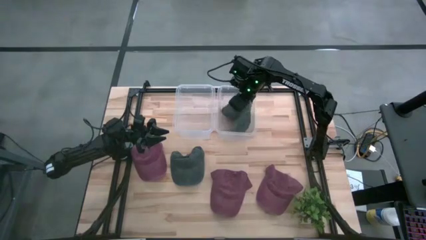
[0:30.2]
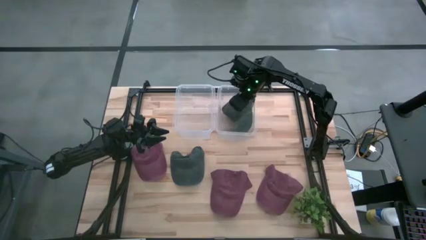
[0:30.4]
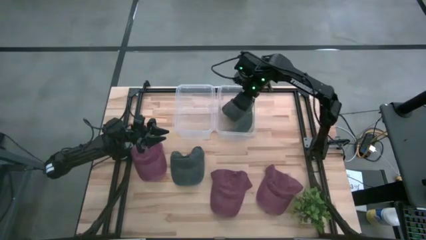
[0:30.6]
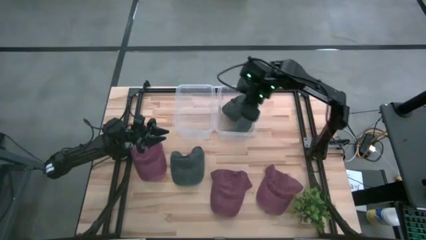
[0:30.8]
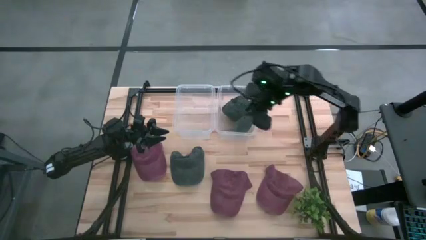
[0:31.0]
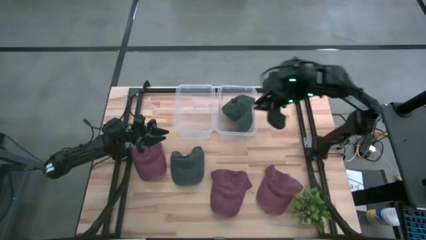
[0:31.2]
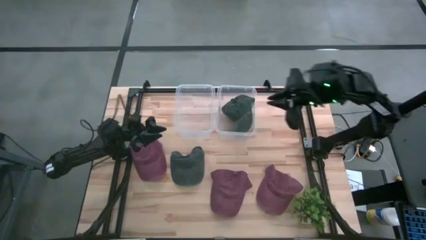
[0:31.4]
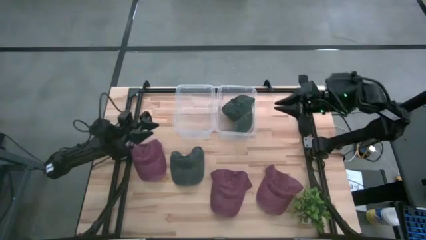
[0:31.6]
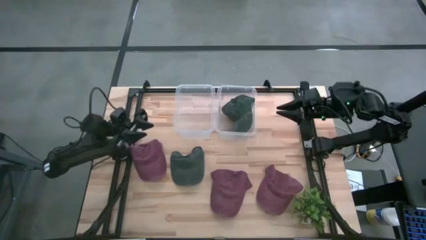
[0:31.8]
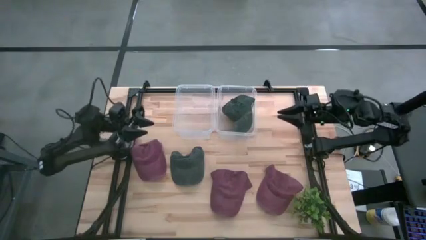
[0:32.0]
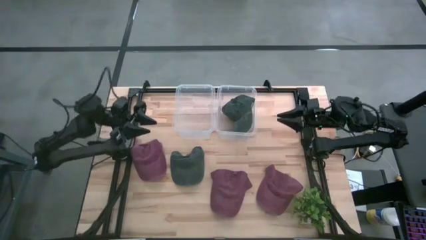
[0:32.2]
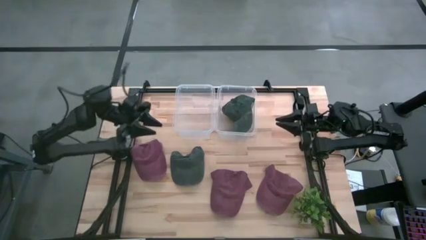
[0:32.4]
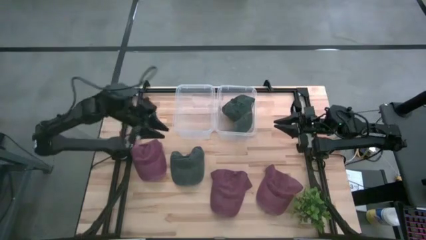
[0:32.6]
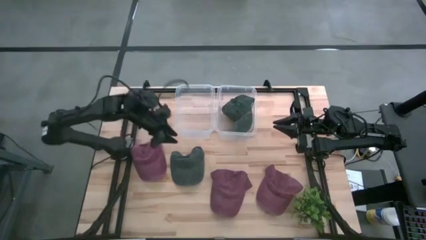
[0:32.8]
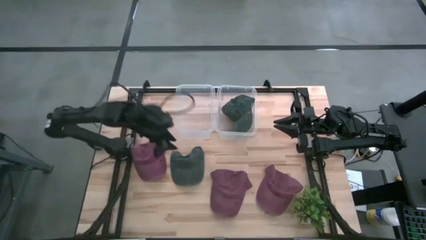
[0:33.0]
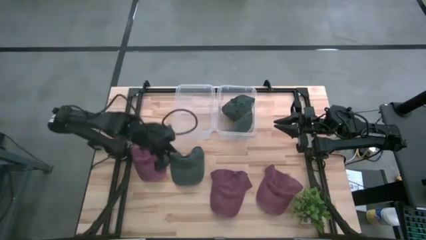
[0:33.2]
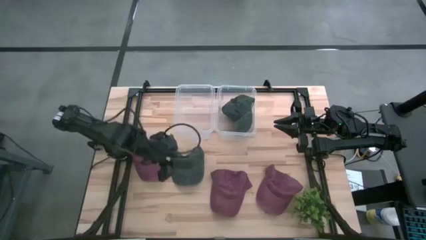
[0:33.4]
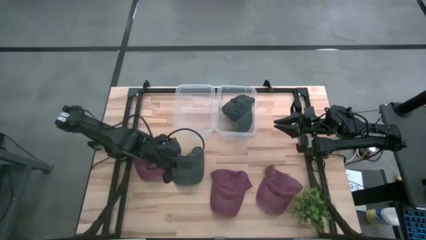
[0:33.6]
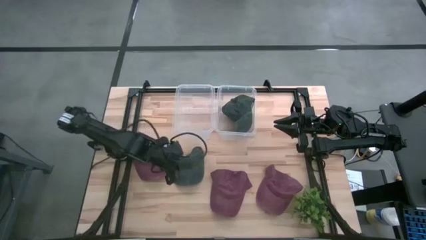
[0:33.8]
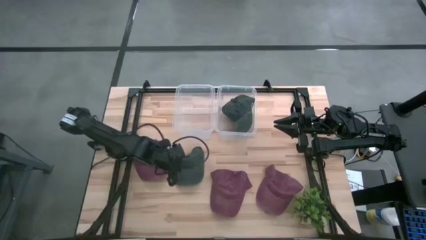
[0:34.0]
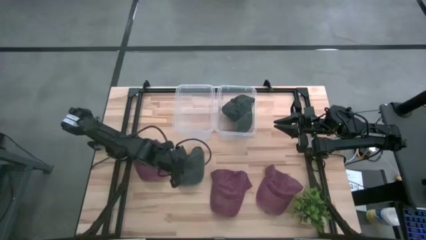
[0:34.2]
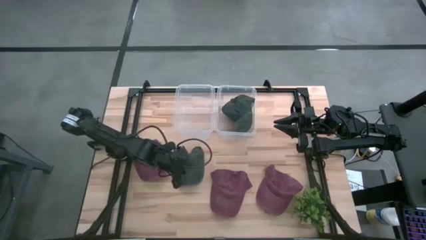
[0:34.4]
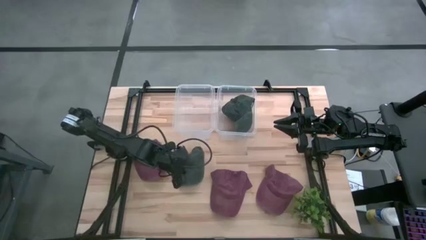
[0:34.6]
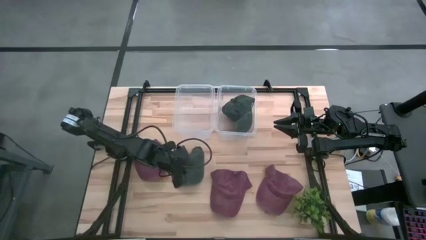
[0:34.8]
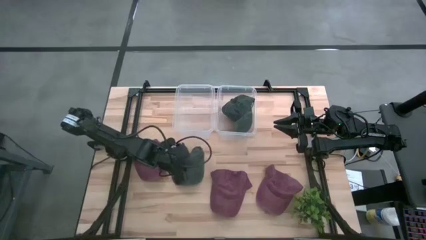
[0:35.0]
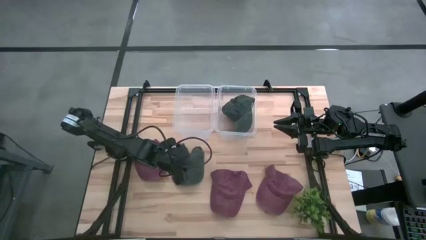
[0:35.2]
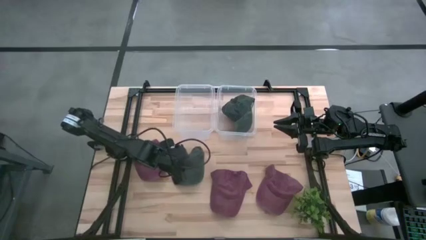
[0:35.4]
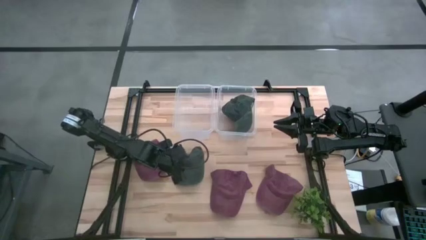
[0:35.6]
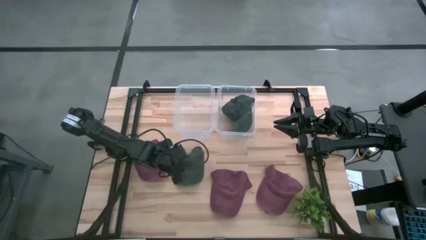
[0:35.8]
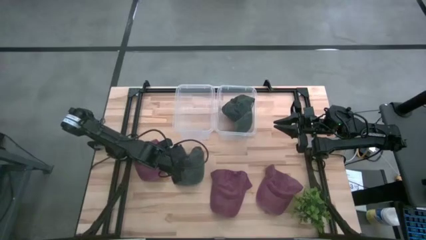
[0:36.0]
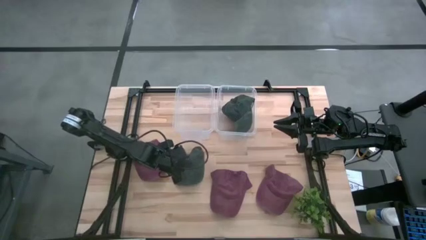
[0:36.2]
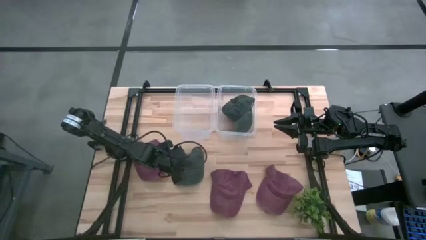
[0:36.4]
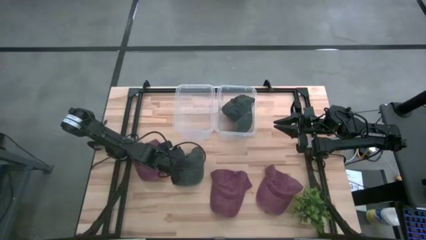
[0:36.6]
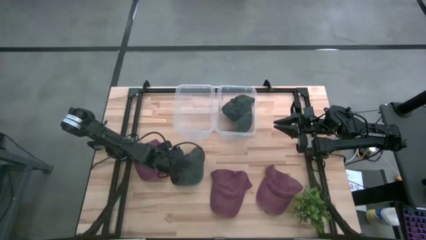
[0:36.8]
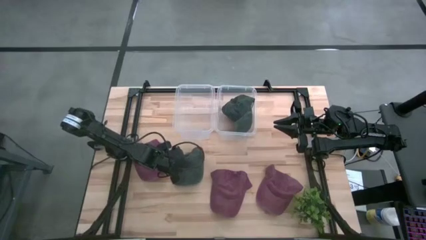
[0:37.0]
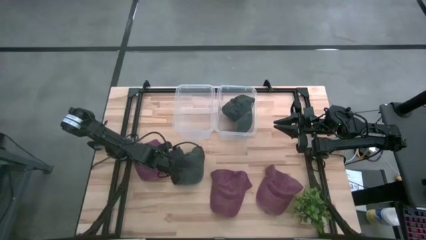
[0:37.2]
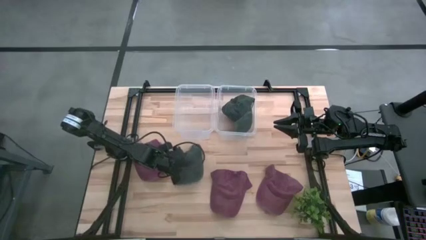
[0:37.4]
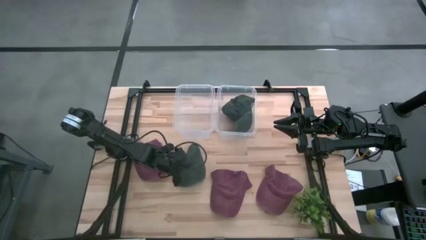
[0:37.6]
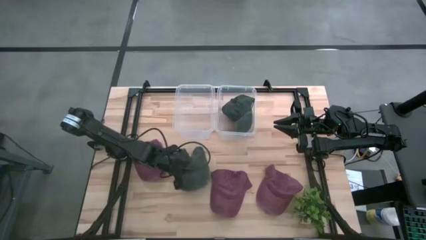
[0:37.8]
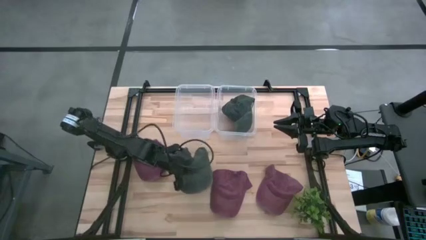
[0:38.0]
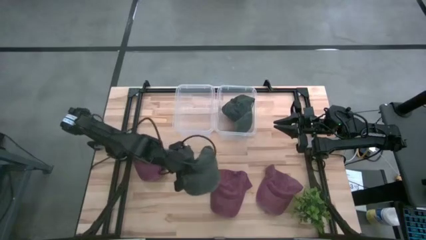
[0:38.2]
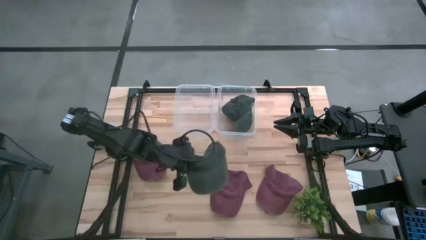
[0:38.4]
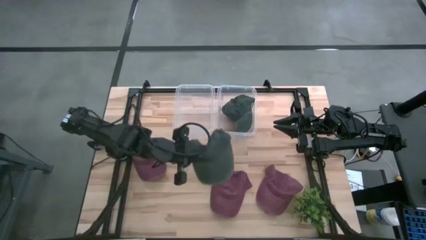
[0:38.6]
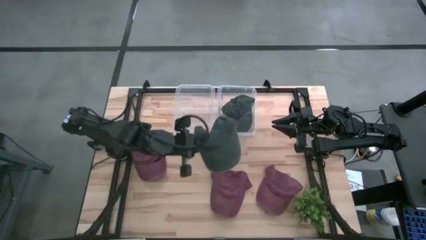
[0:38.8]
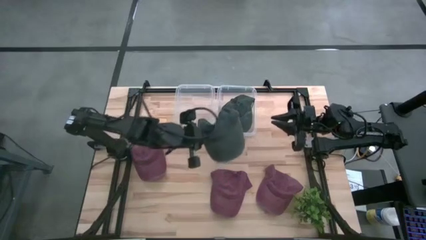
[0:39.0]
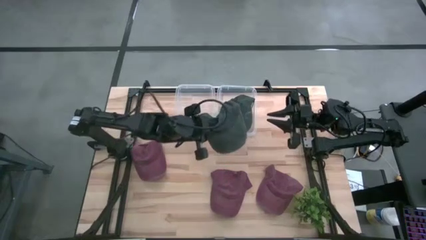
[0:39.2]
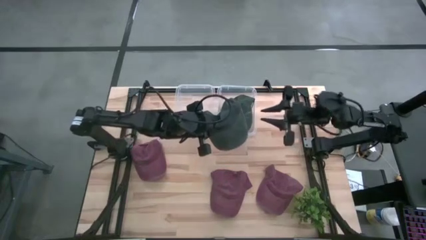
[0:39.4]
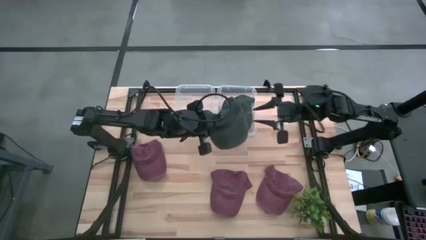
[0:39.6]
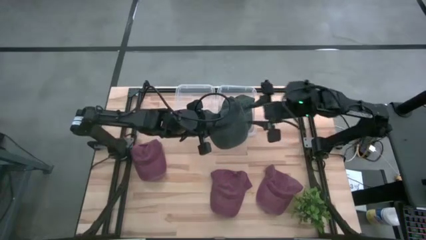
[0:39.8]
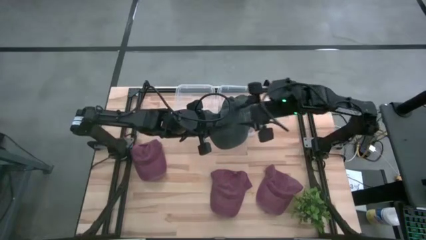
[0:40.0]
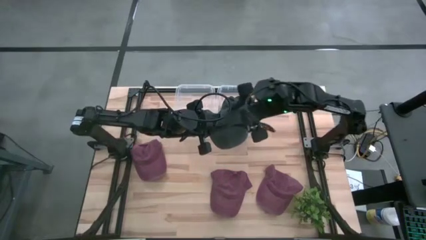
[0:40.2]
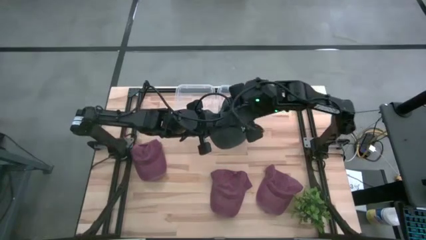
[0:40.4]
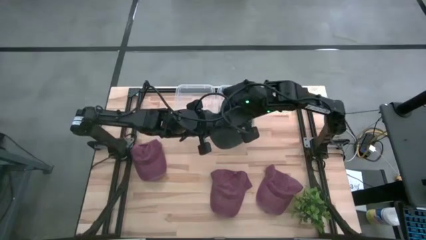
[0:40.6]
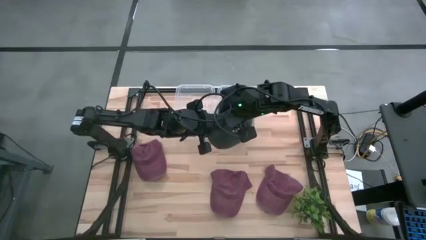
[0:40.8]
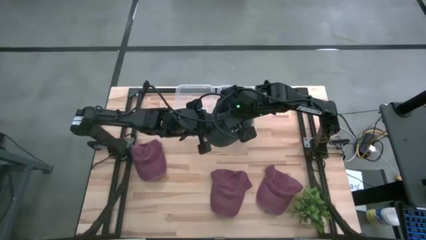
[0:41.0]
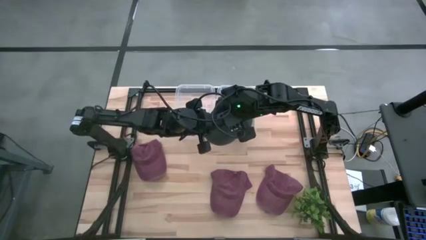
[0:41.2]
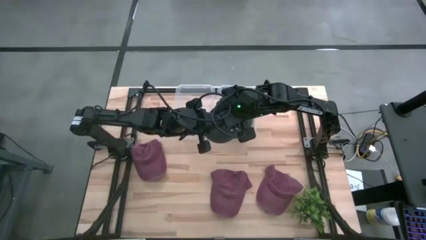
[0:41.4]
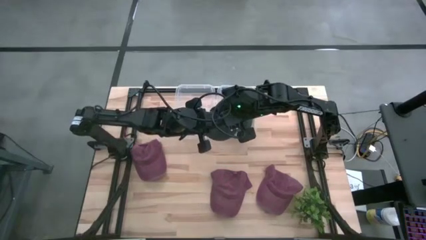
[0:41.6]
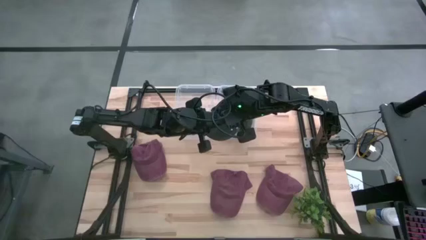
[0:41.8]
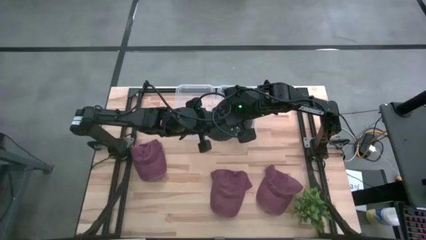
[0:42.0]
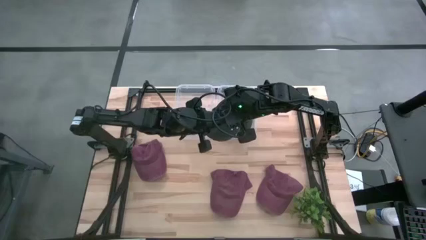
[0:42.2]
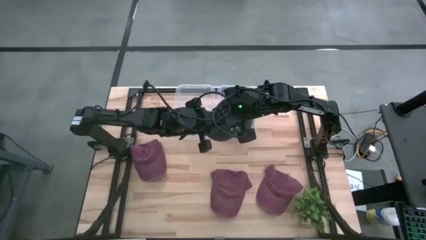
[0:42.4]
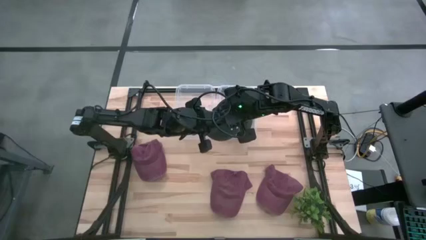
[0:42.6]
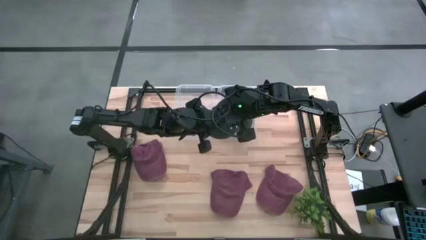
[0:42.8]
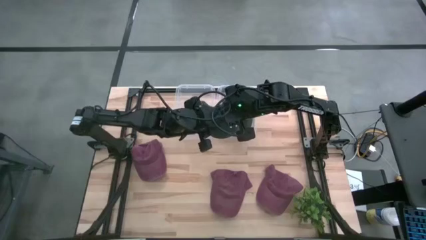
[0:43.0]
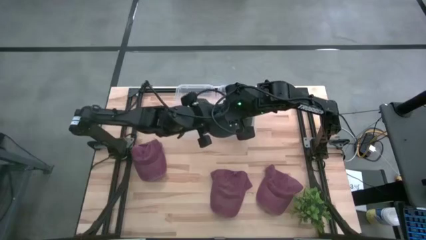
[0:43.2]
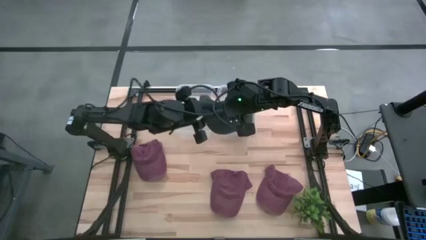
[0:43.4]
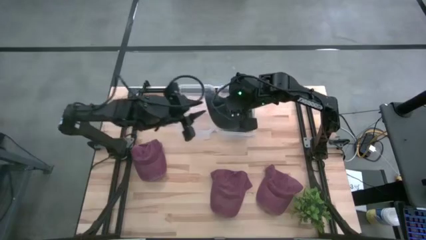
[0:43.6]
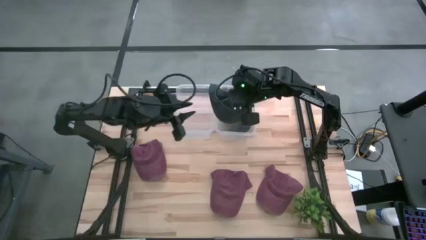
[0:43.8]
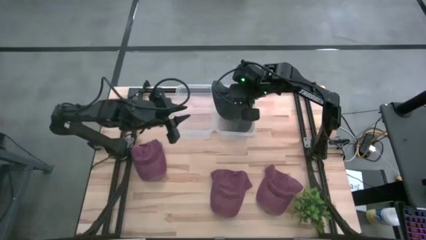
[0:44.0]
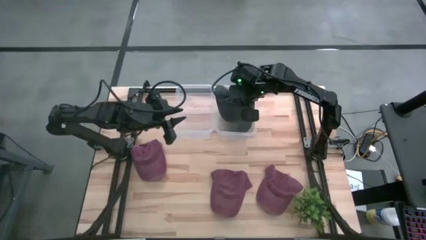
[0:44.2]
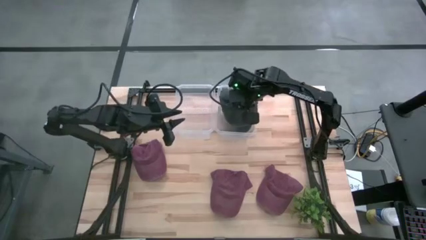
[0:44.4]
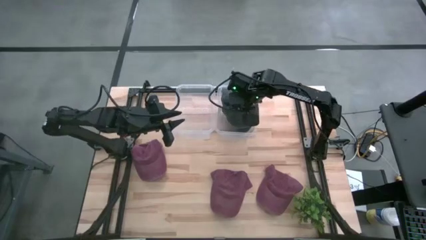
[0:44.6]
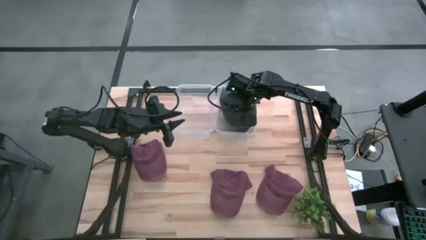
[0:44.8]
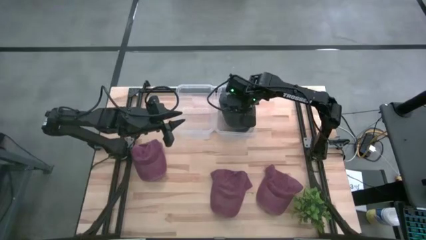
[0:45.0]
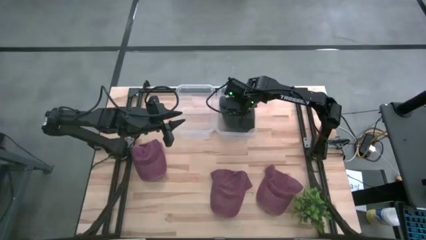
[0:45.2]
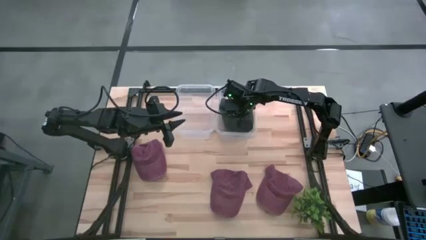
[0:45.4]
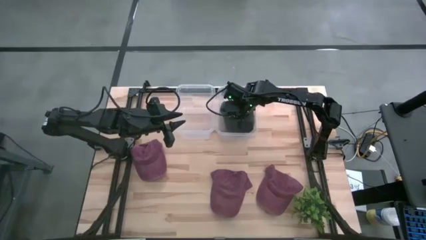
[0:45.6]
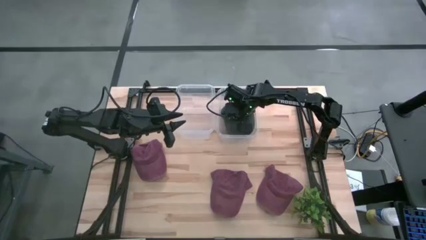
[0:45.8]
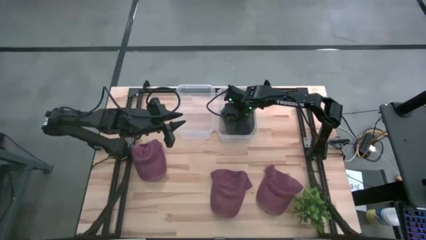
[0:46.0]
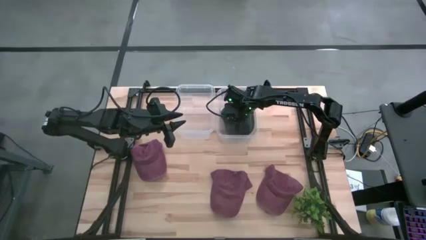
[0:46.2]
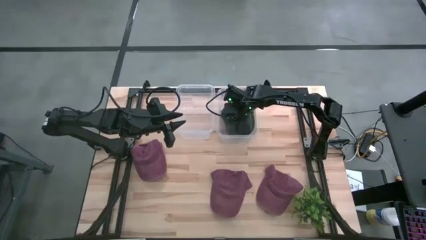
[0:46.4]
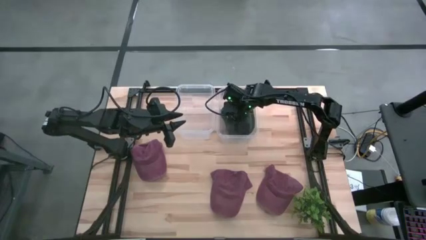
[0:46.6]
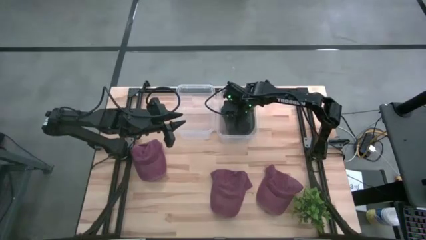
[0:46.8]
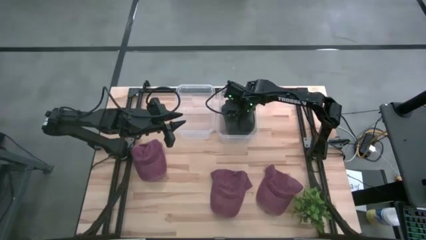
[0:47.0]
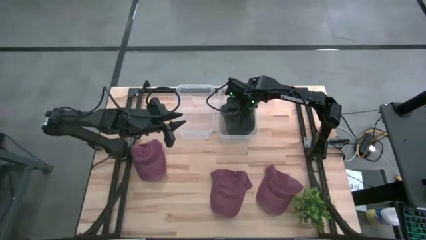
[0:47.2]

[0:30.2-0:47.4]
Task: Pick & Place hat
Put the black cap into the right transparent bin
